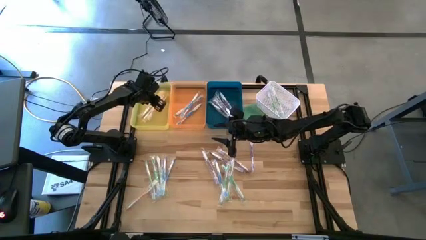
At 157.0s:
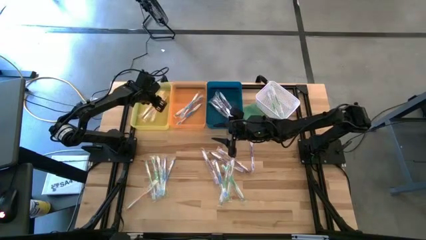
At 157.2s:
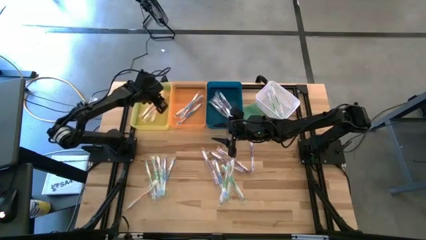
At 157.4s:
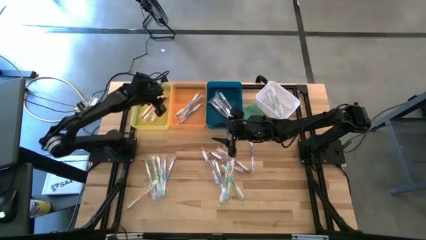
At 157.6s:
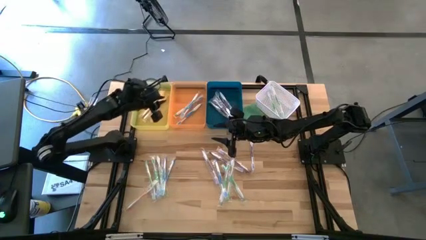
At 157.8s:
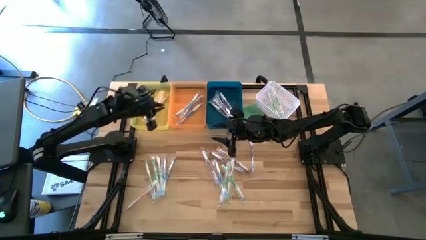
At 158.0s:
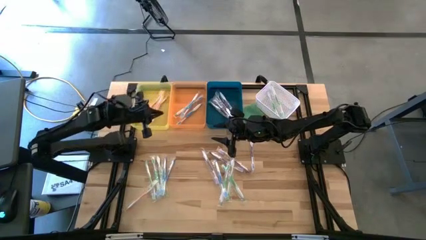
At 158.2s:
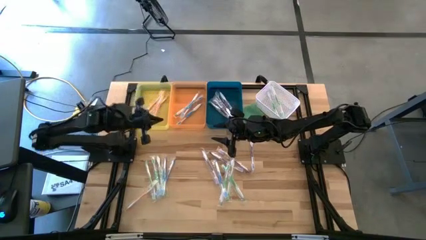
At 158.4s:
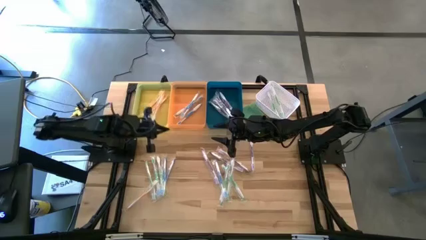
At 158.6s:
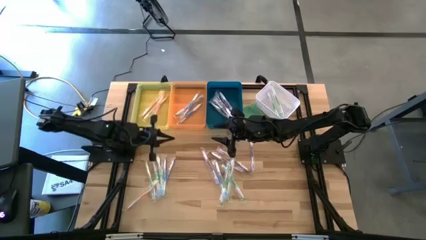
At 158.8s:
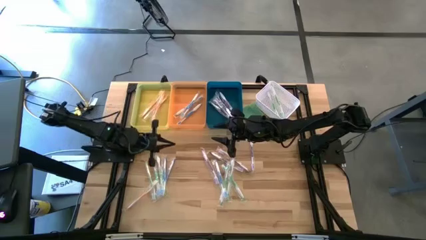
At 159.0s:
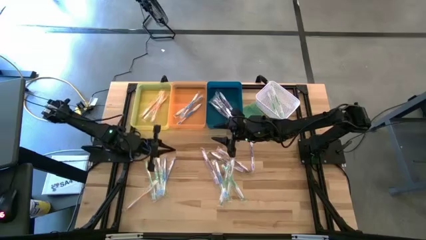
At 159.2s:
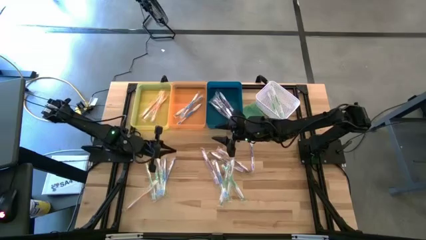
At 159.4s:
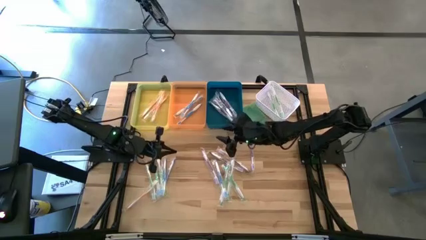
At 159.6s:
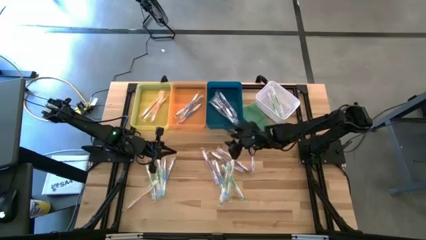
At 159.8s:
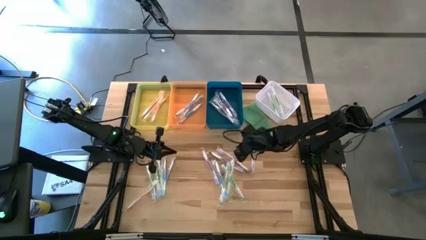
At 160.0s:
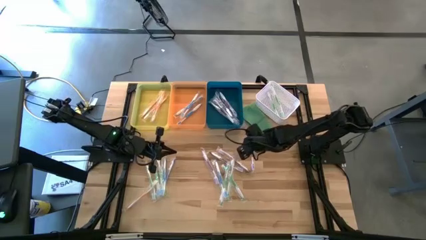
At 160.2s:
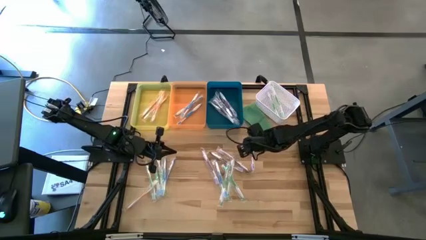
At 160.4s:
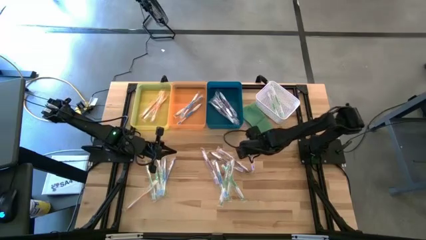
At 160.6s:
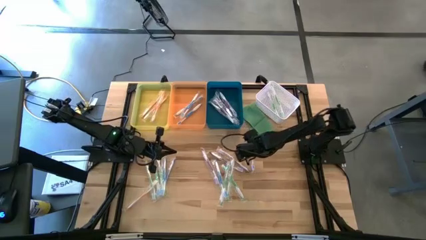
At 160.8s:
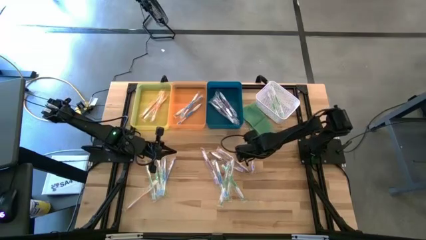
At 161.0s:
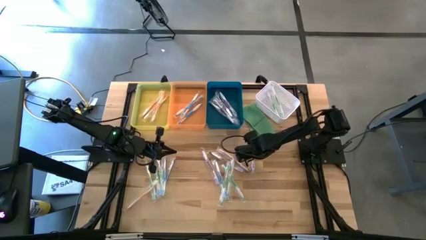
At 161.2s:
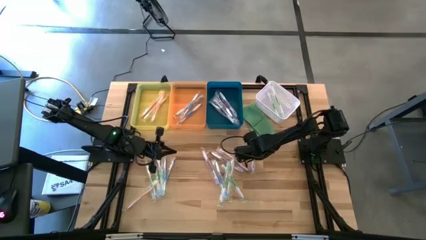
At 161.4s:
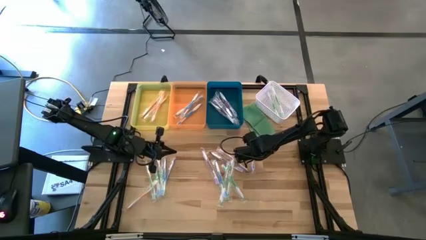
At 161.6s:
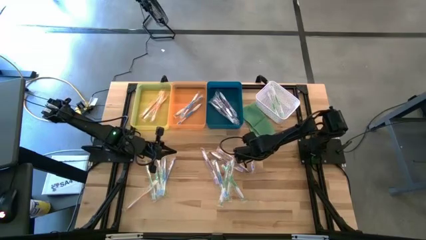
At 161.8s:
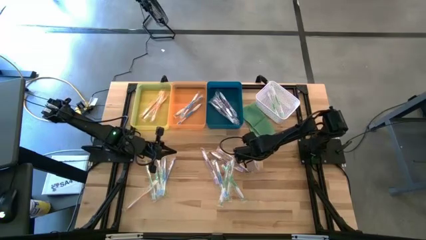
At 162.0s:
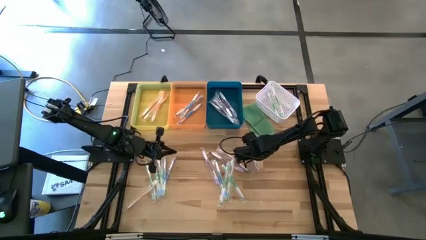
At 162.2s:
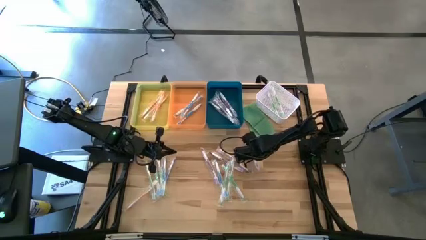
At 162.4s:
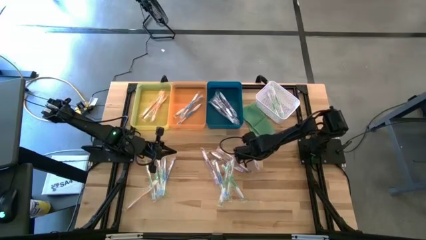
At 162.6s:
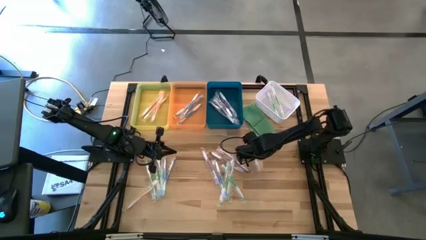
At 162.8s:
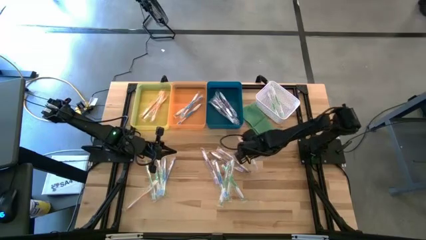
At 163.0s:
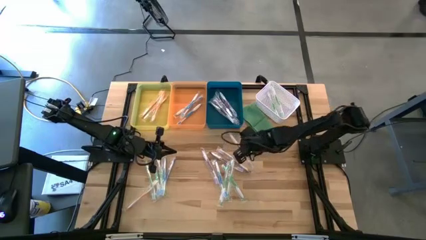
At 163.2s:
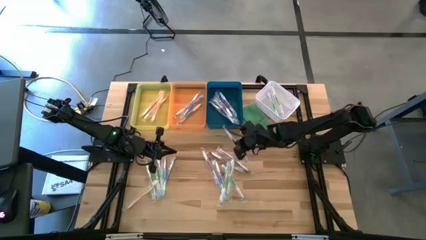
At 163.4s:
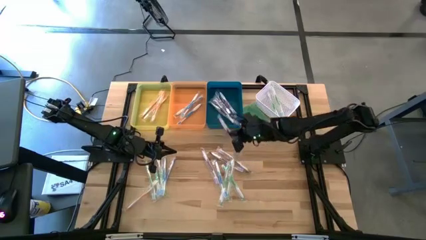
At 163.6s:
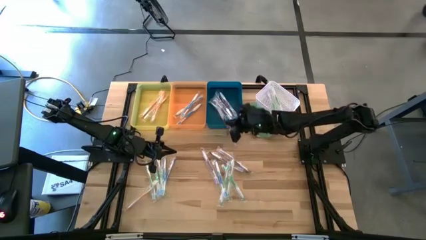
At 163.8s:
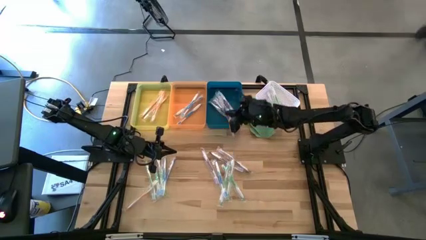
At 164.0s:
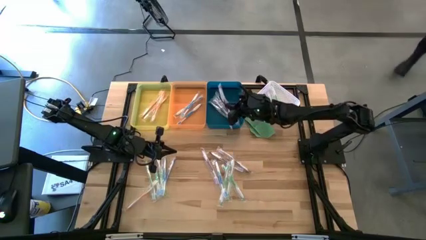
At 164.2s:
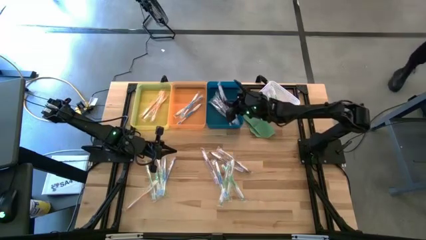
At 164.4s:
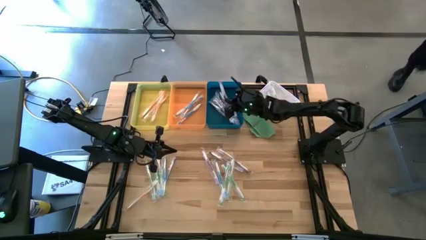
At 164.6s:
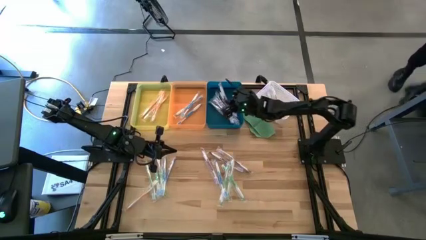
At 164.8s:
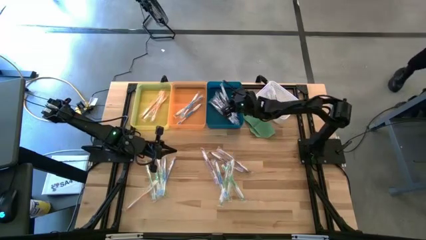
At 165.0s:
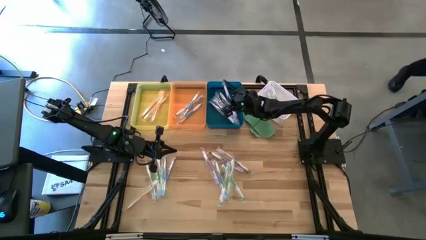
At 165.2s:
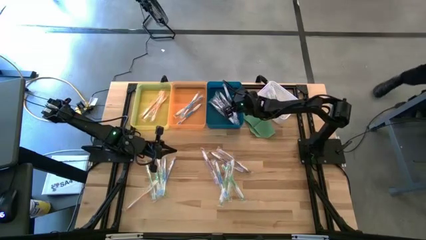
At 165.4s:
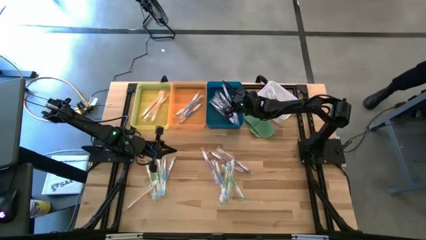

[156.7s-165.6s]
Task: Pick & Place Toothbrushes
Put the purple toothbrush into the blue bin

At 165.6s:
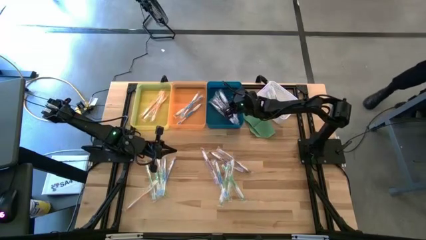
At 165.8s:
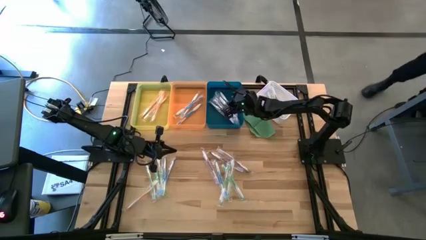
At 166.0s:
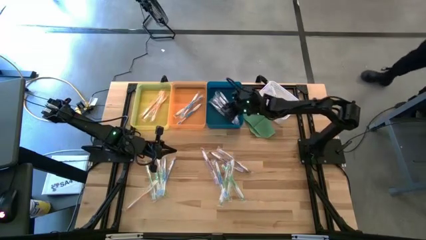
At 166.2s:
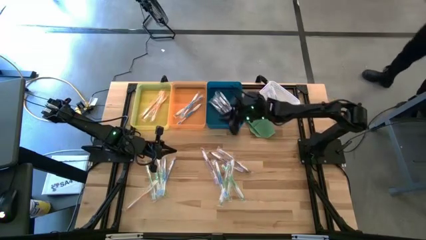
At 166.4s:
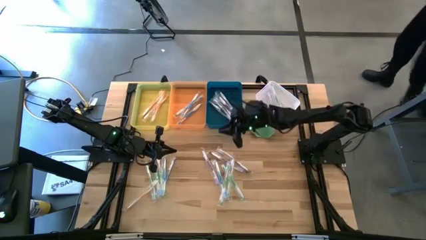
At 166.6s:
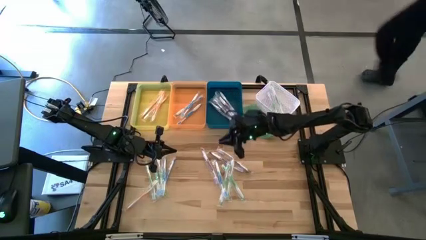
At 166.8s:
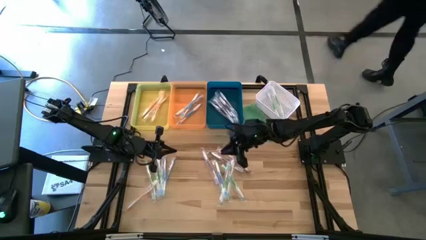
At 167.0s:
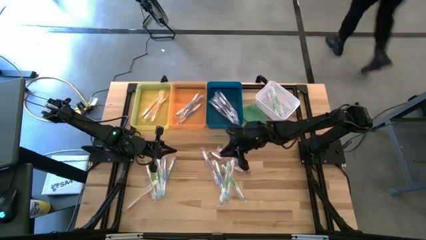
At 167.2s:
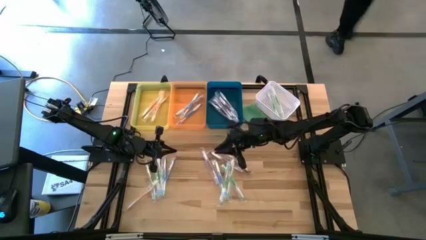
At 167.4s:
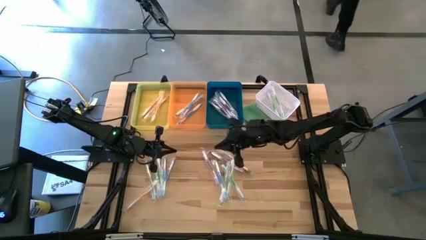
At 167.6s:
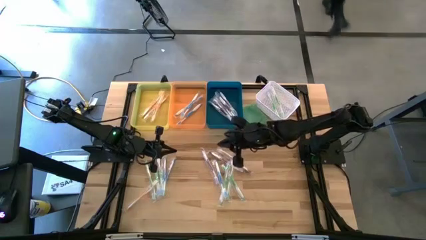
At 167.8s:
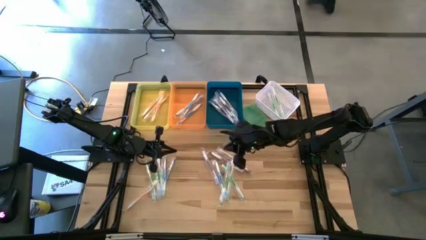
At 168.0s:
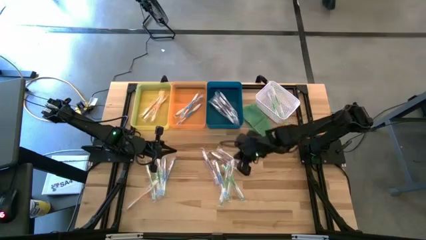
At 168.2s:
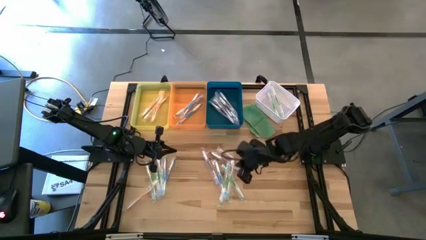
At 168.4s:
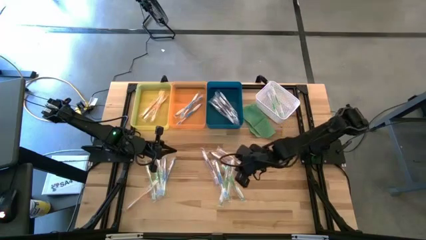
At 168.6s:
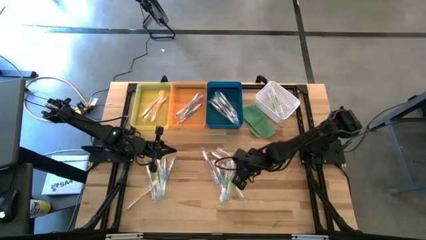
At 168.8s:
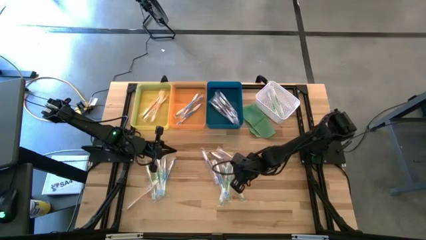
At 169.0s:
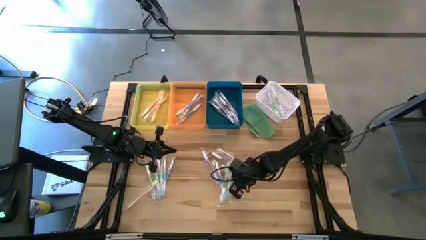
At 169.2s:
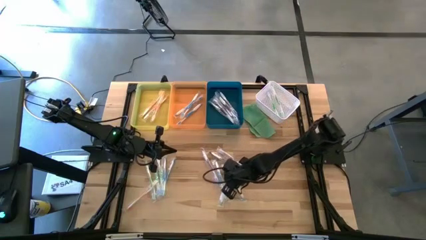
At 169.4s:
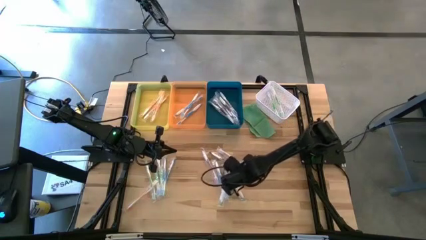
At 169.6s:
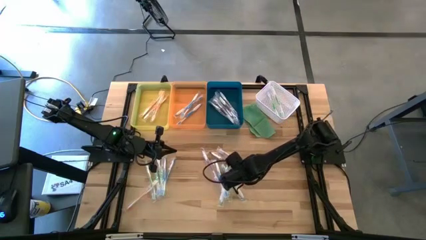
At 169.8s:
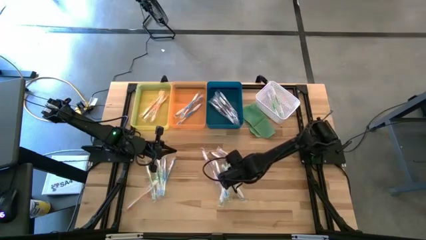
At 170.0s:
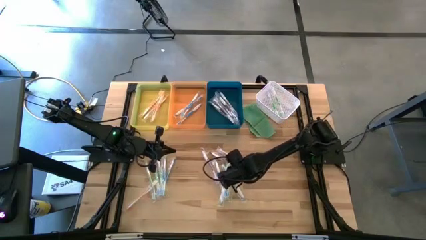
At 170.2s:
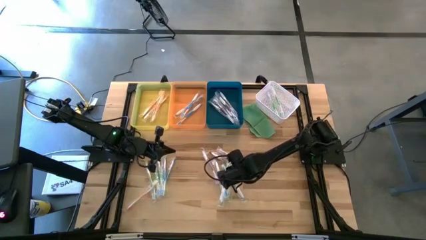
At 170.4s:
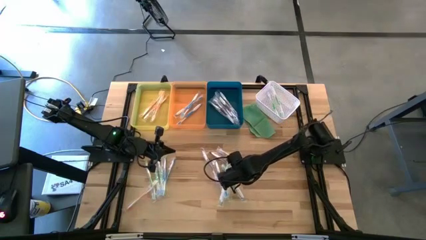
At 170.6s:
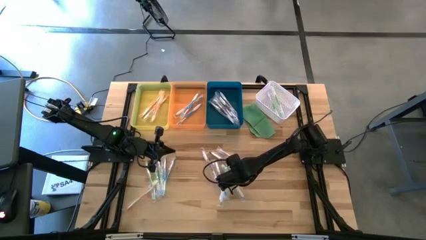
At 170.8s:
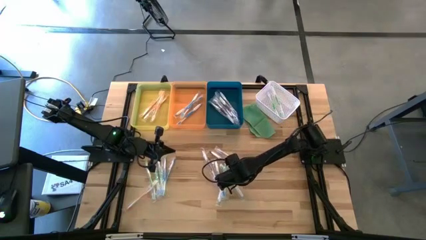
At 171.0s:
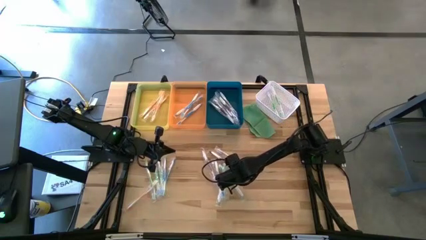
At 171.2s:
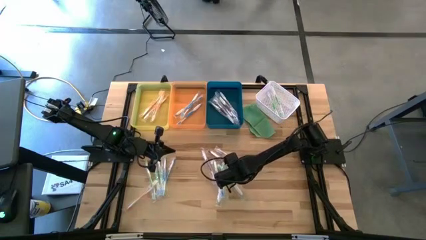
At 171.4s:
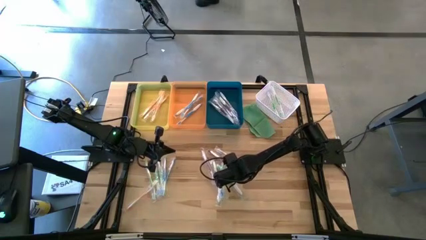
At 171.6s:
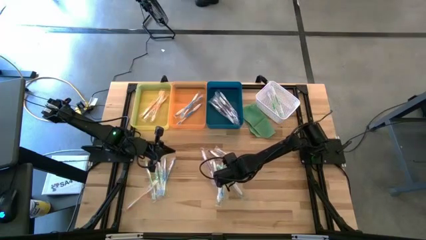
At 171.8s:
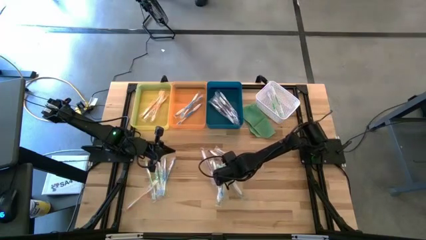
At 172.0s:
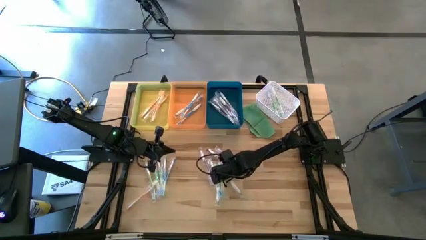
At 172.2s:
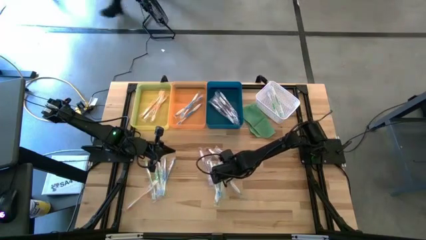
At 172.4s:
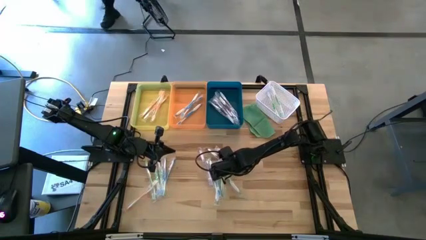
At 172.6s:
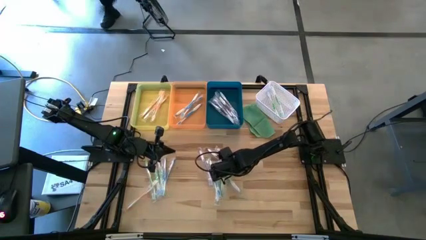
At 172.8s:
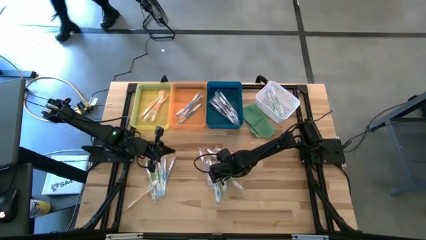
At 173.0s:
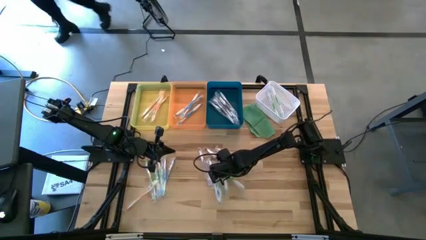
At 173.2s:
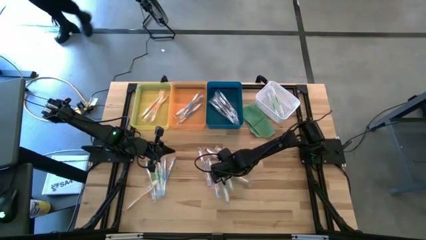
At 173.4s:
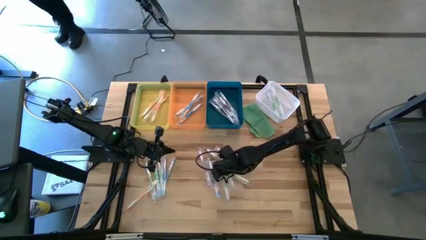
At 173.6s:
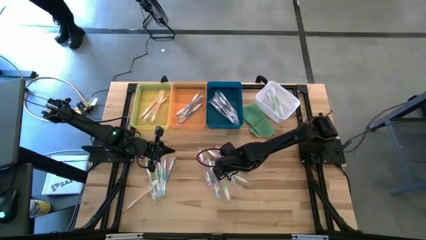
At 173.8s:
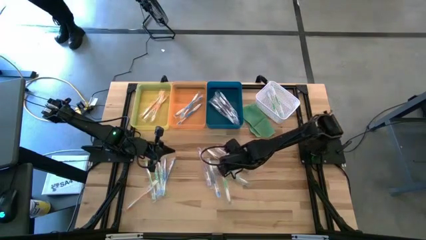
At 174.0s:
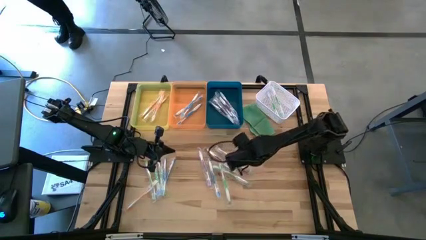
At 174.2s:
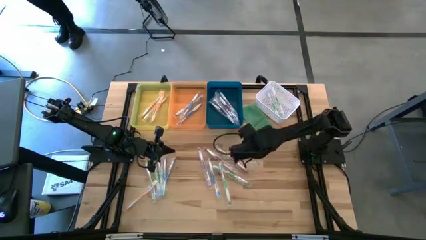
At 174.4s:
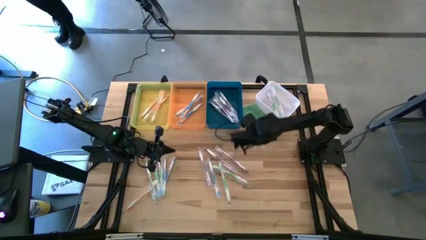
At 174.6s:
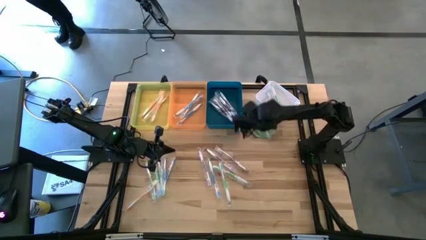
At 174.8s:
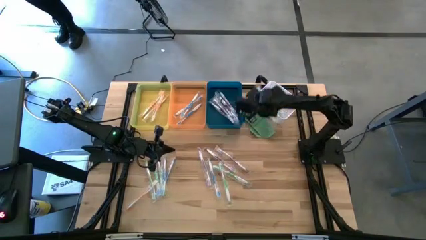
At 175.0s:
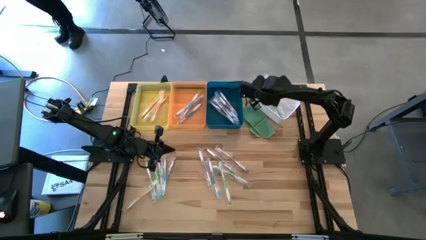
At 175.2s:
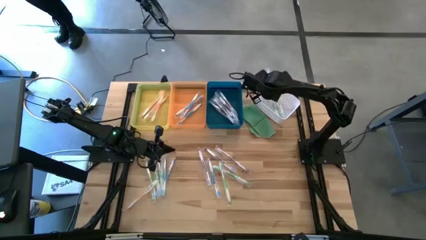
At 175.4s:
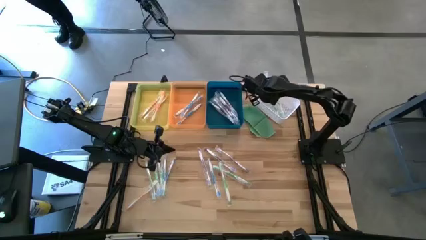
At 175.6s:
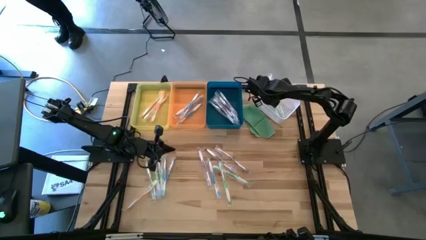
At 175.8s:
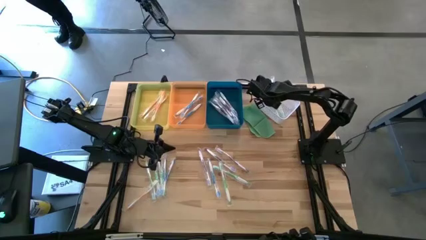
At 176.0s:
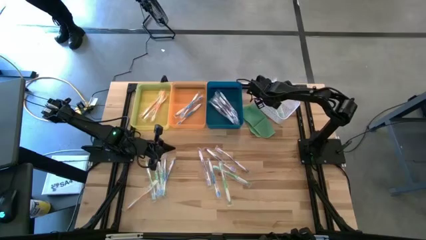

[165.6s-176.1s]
Put the green toothbrush into the white bin
